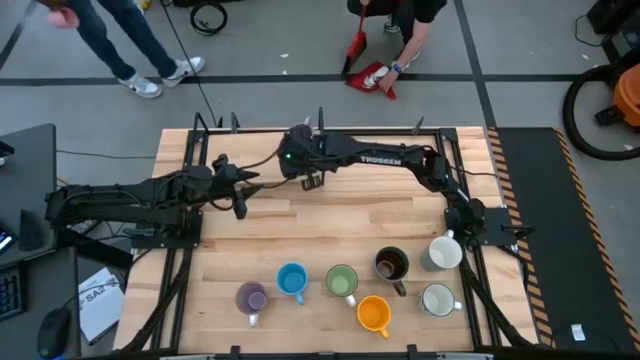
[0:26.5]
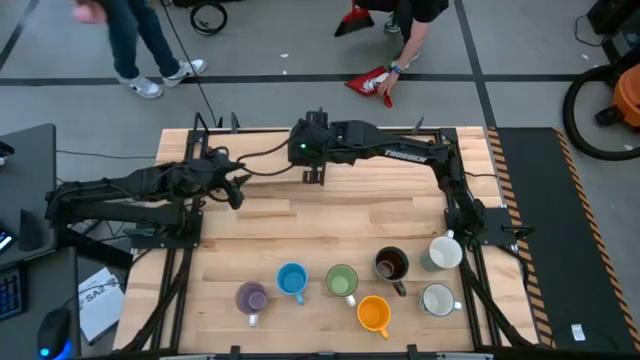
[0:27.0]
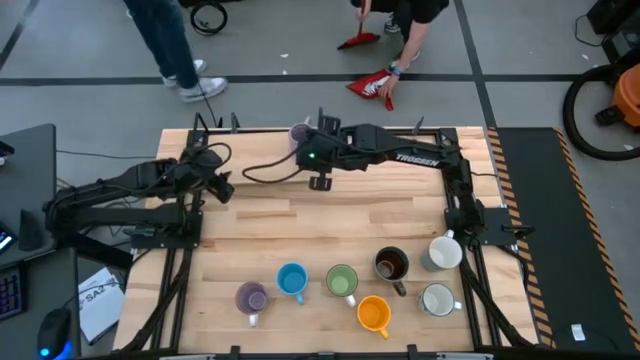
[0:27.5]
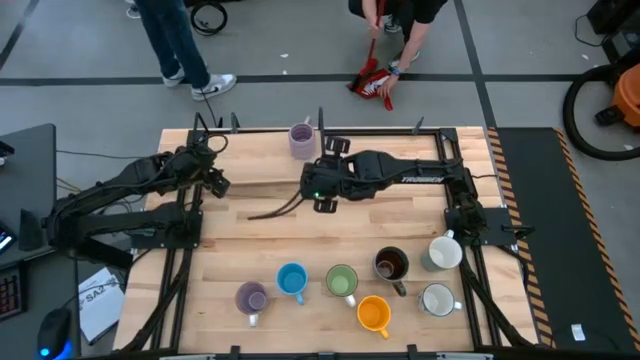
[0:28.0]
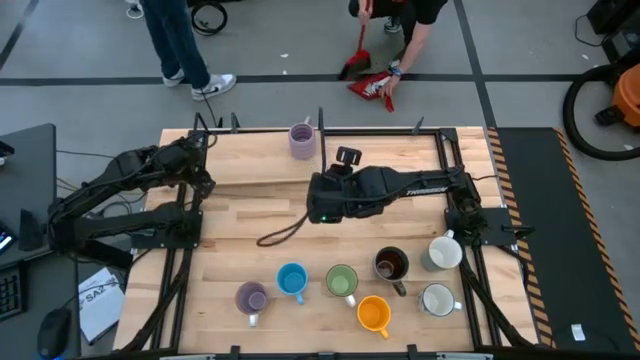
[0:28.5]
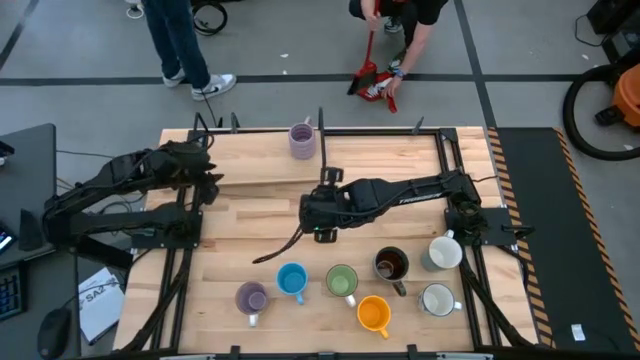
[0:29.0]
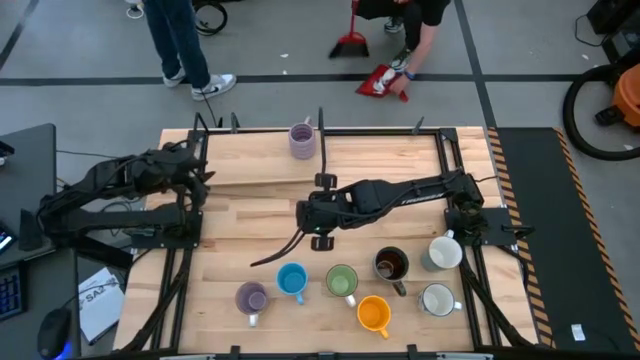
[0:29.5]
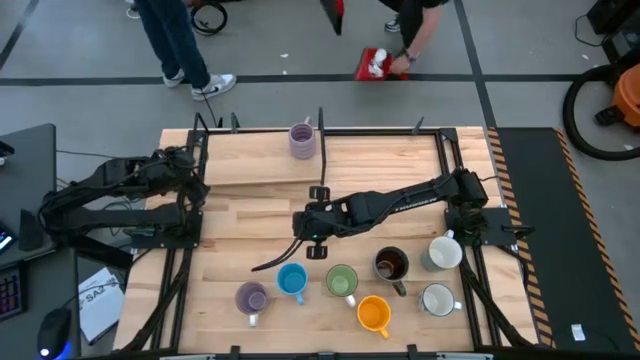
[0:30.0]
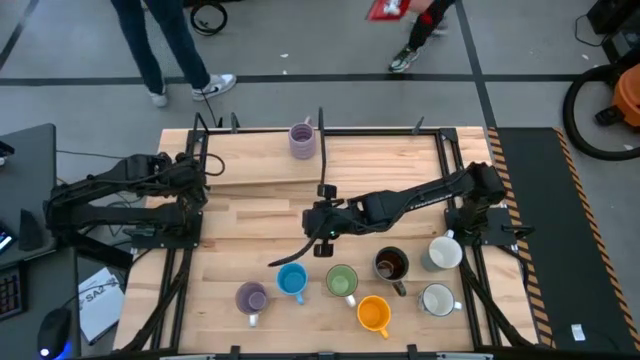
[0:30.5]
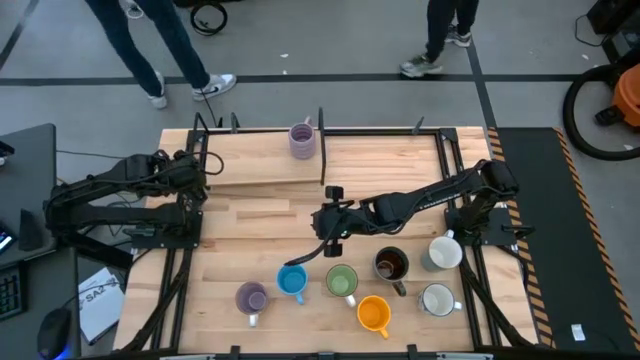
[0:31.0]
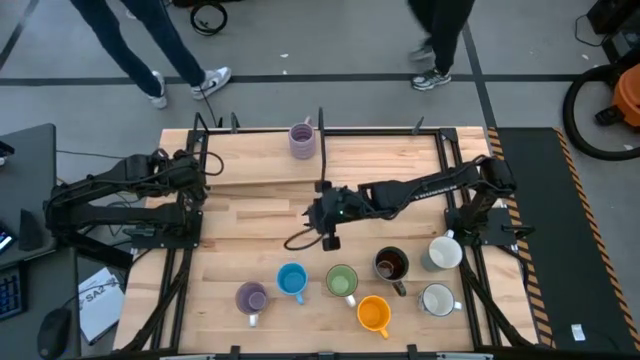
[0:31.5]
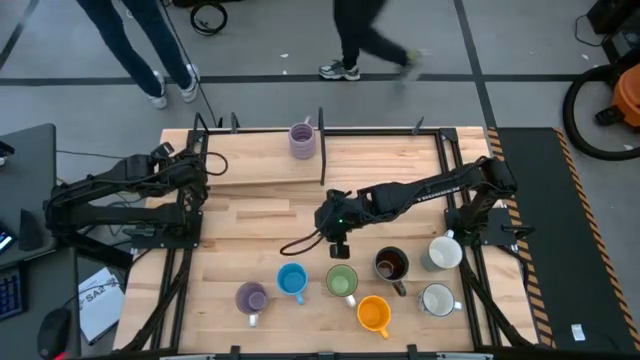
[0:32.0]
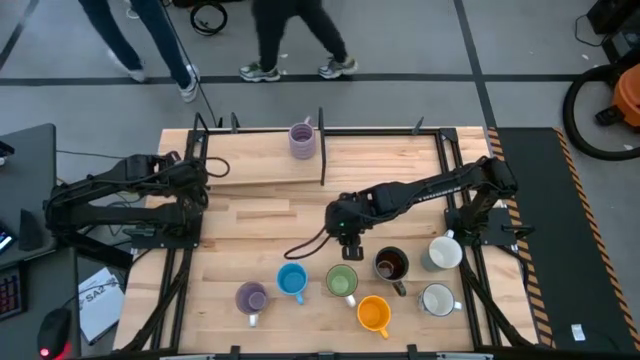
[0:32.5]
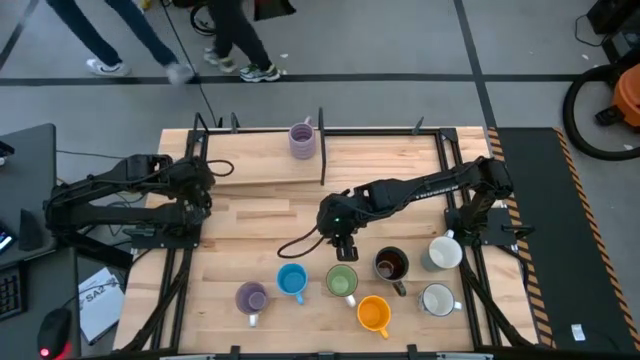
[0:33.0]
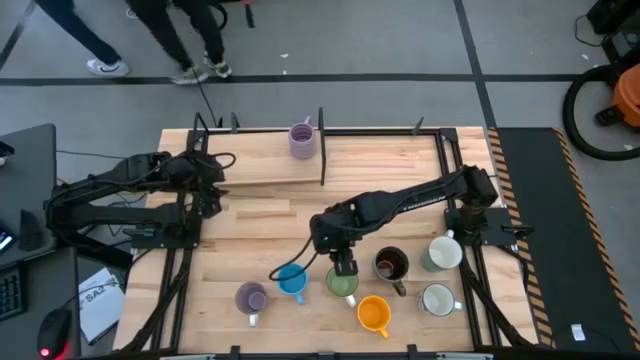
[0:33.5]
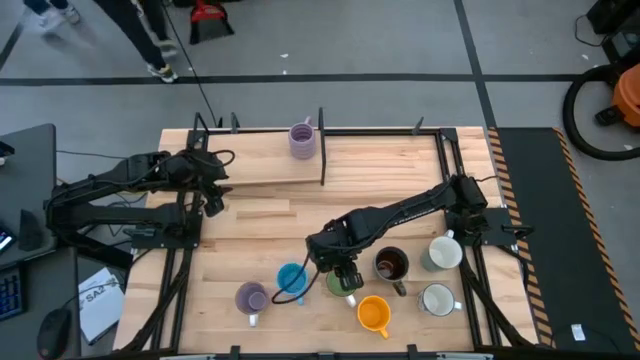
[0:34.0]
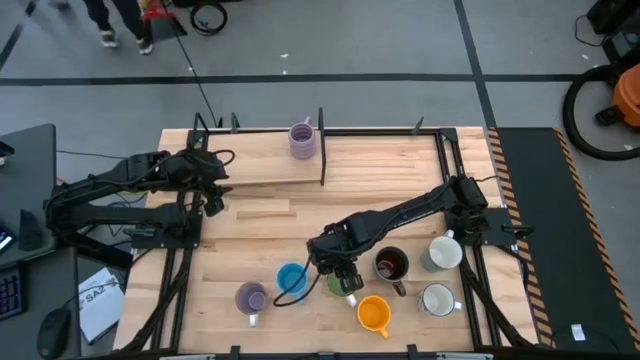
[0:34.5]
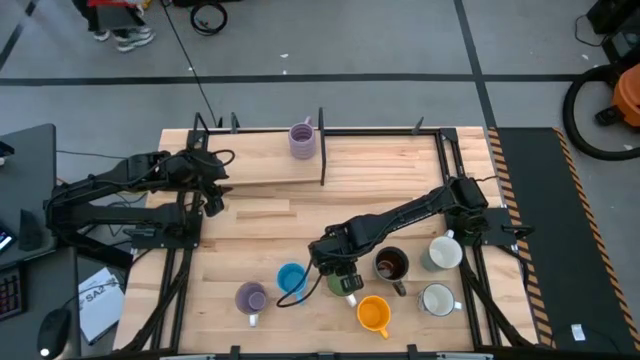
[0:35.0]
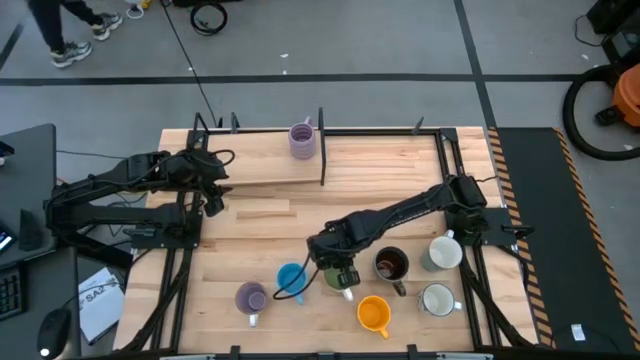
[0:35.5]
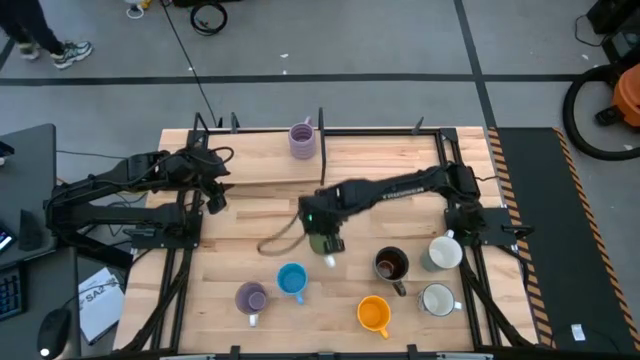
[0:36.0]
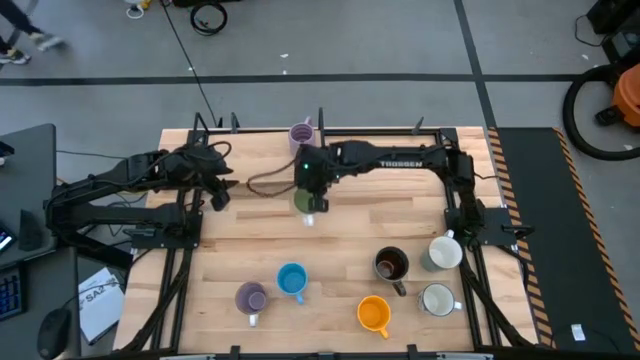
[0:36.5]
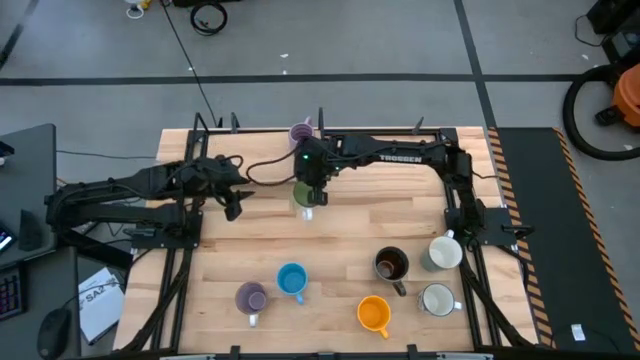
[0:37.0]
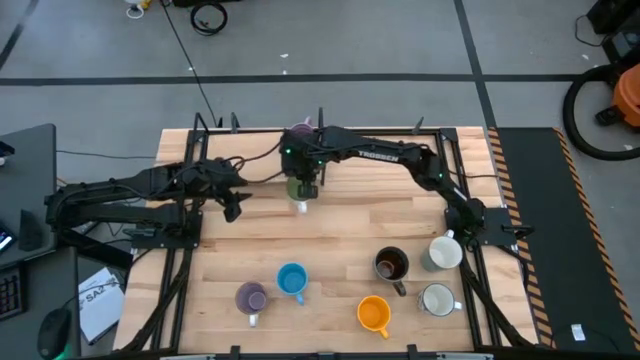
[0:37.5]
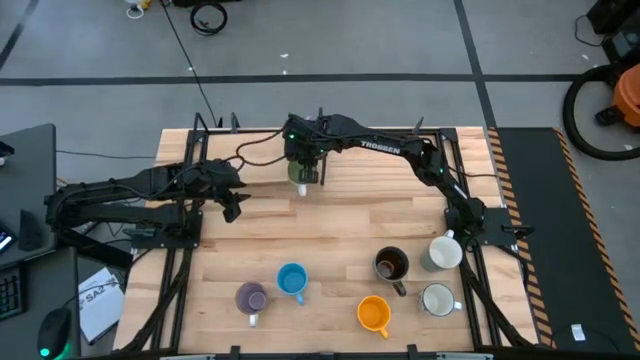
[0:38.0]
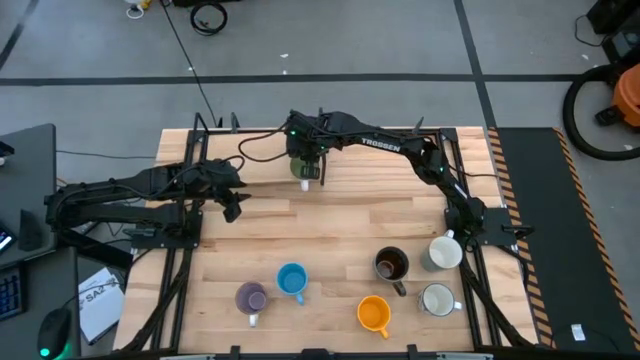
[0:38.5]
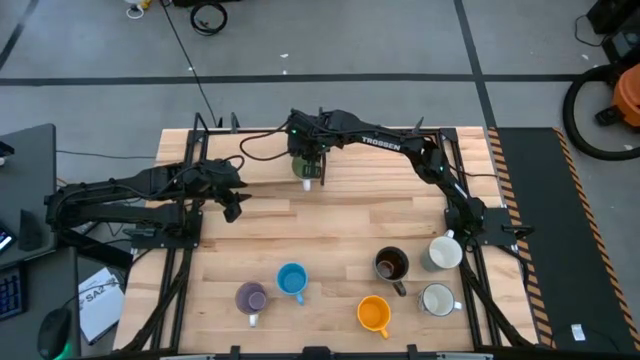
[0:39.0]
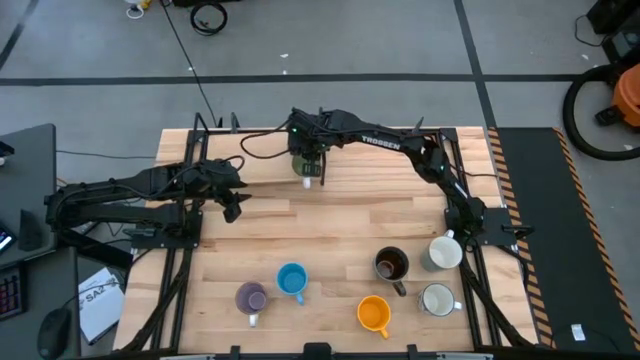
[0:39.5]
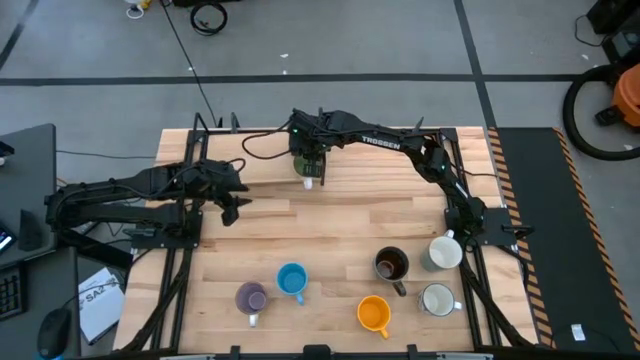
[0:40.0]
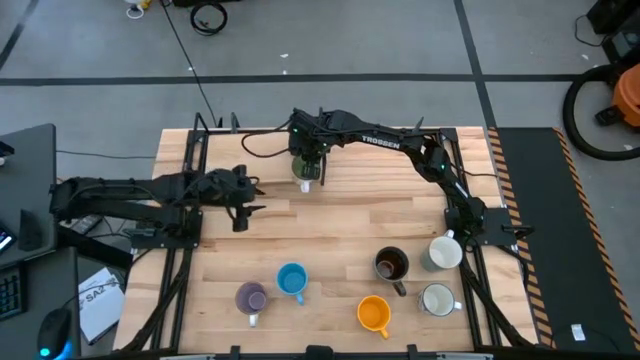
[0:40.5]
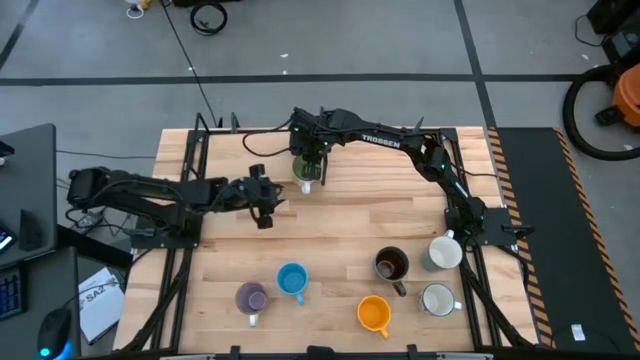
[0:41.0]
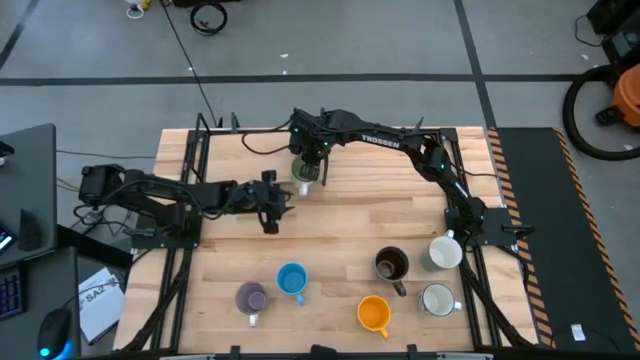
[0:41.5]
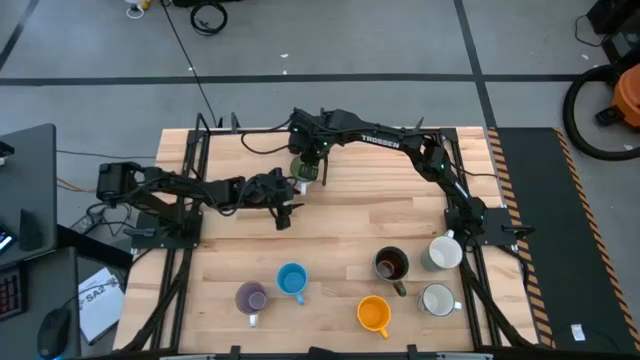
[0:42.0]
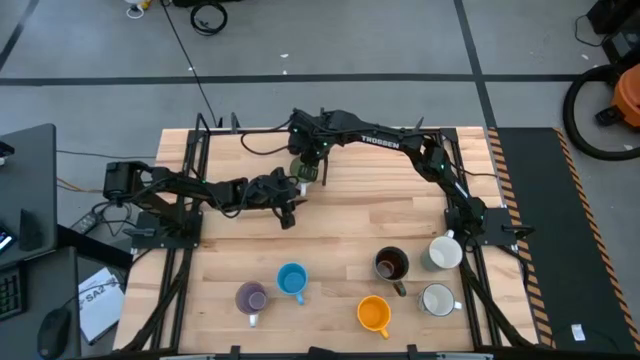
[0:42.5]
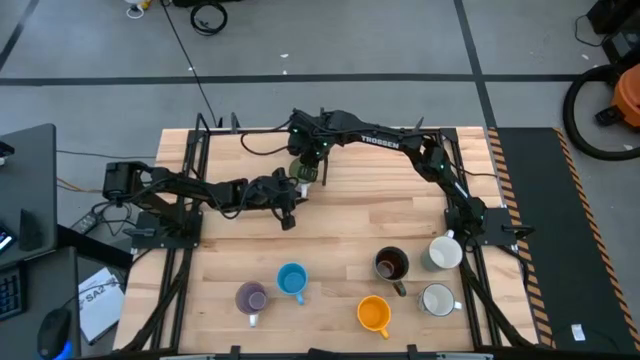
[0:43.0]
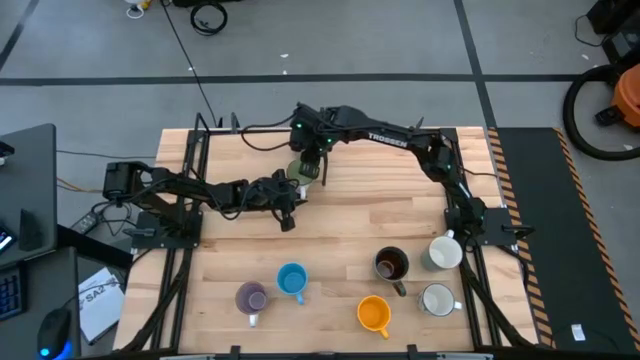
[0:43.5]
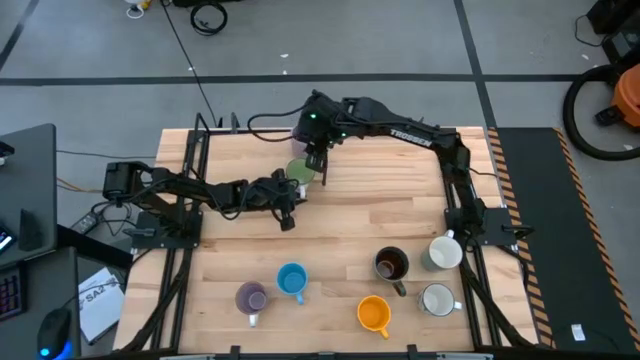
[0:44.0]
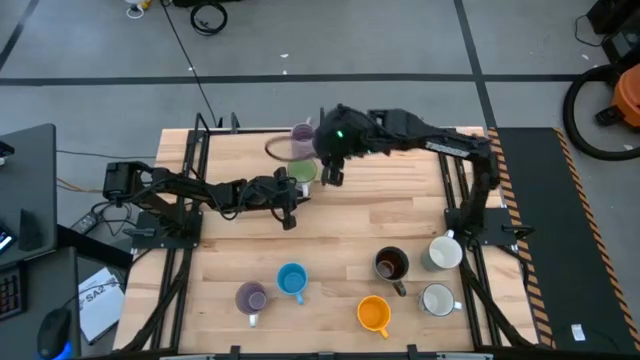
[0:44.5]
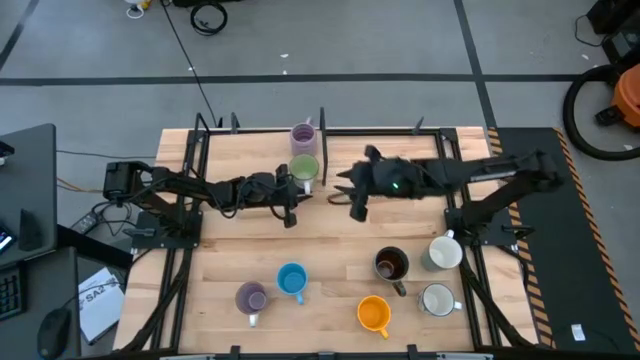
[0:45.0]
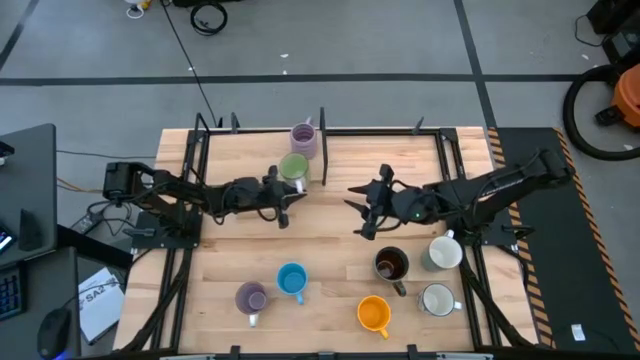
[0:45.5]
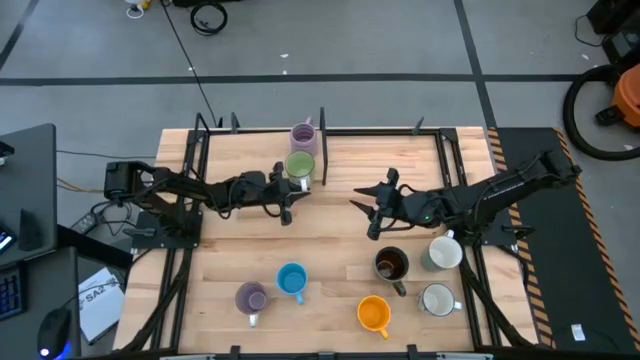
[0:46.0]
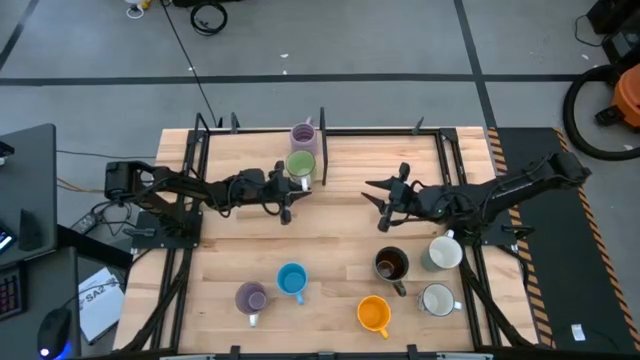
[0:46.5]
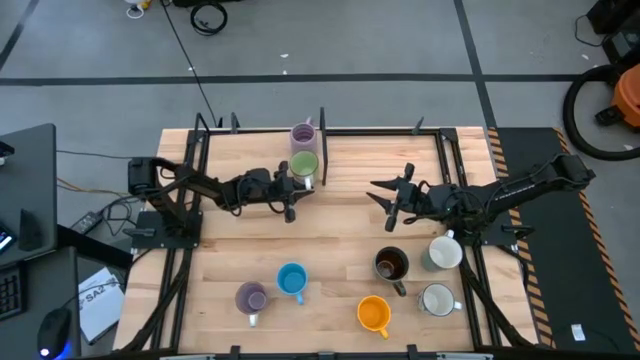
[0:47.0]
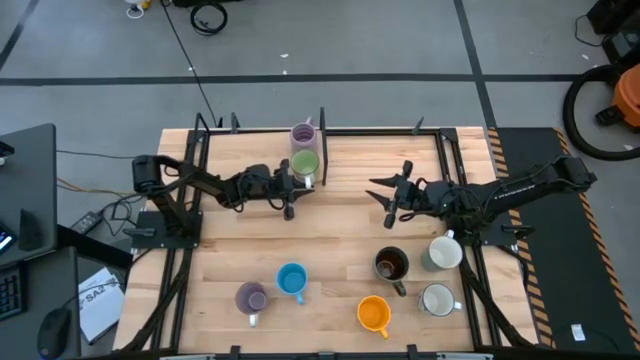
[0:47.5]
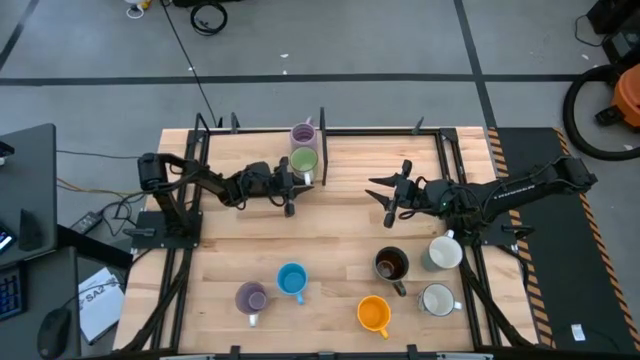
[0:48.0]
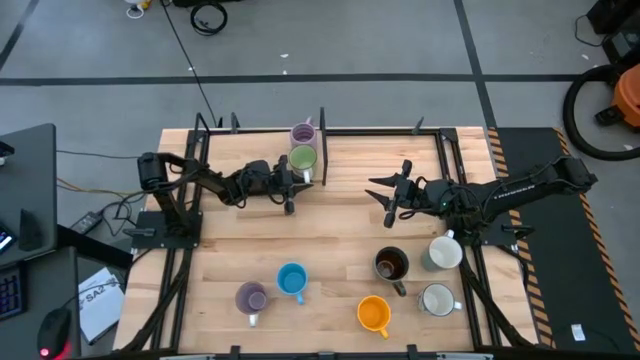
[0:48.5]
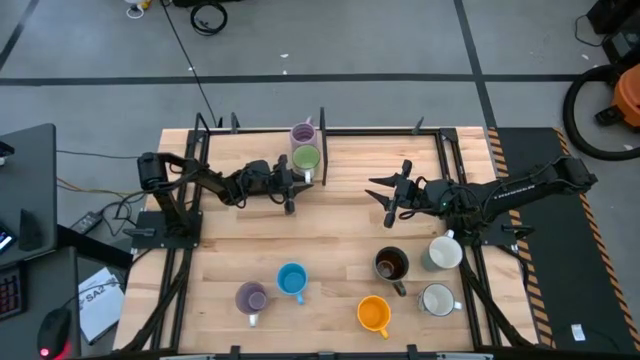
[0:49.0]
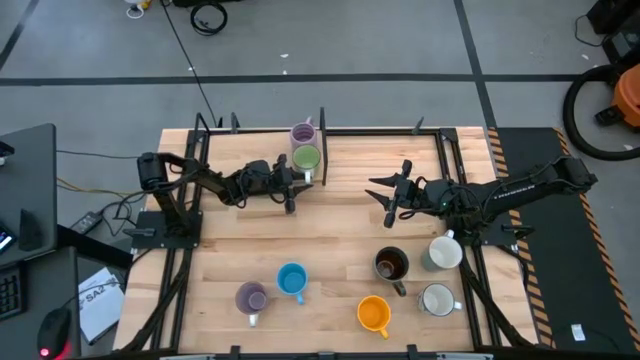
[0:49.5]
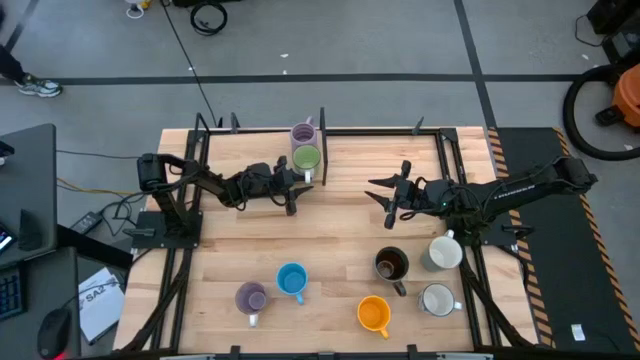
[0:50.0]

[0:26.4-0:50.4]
Task: Place coffee mugs
Put the green mug on the shelf
